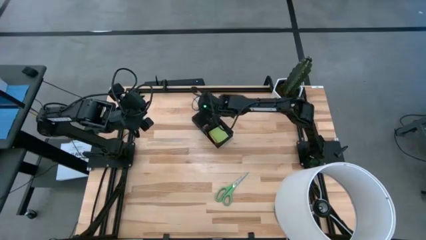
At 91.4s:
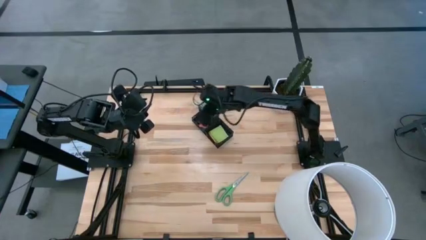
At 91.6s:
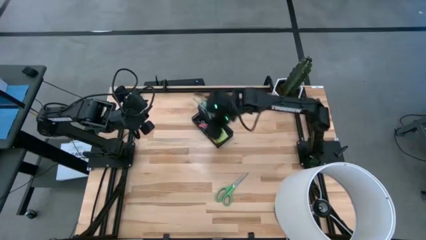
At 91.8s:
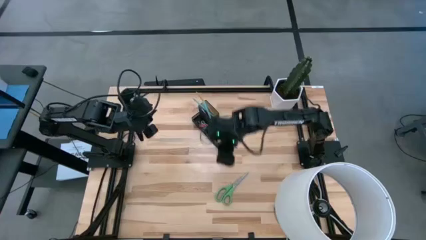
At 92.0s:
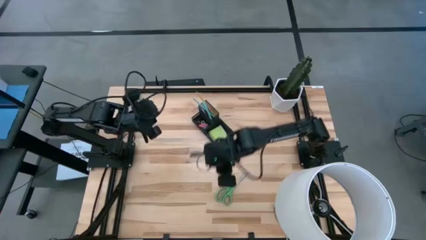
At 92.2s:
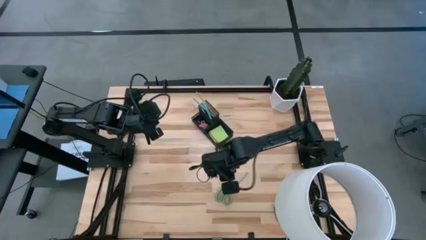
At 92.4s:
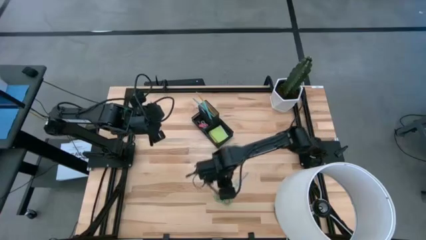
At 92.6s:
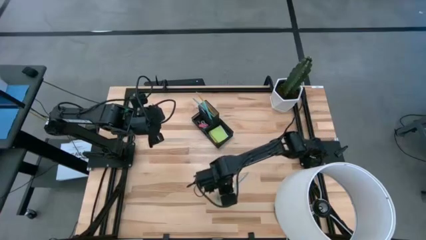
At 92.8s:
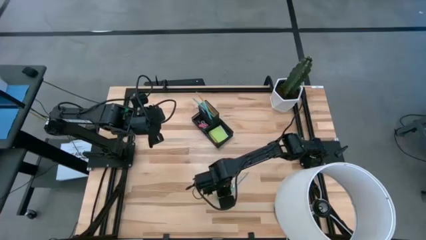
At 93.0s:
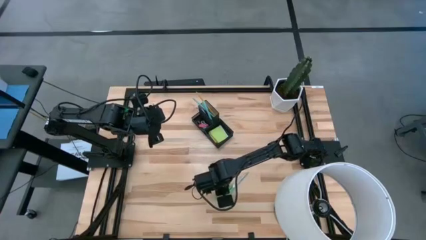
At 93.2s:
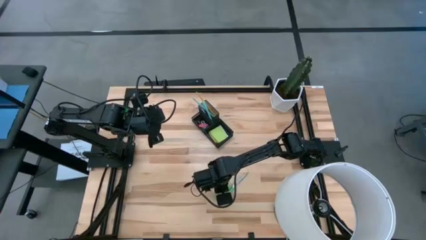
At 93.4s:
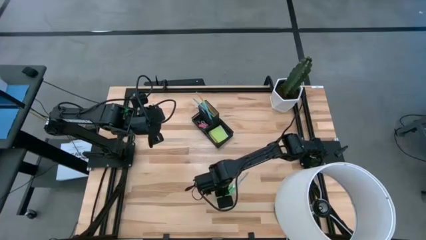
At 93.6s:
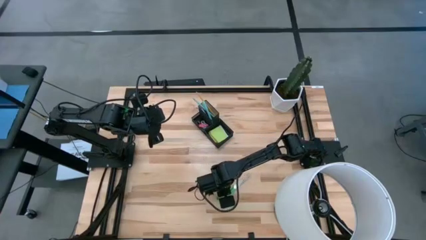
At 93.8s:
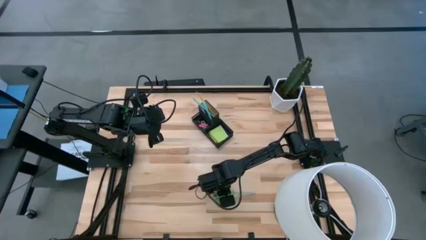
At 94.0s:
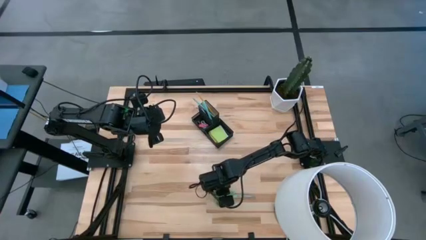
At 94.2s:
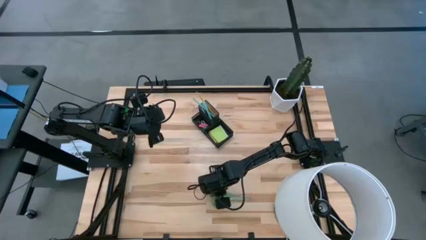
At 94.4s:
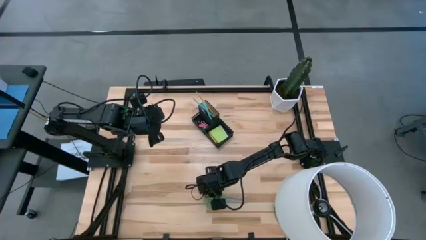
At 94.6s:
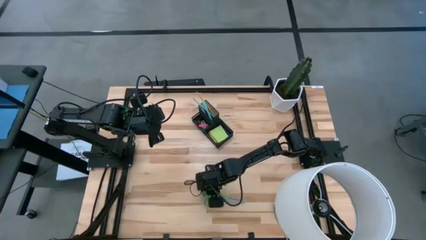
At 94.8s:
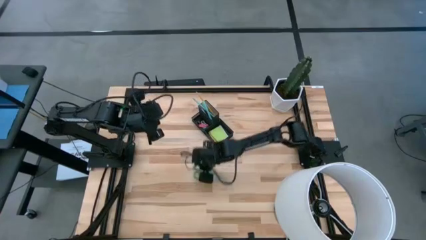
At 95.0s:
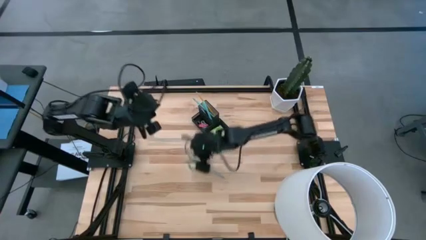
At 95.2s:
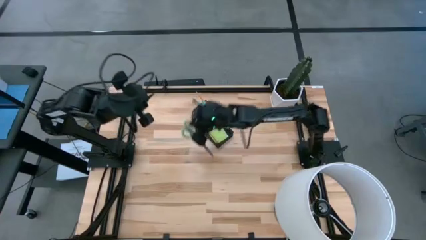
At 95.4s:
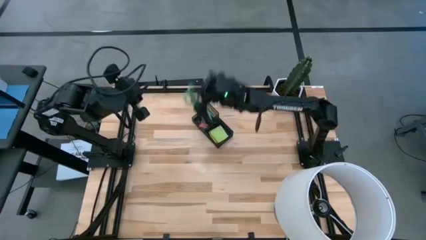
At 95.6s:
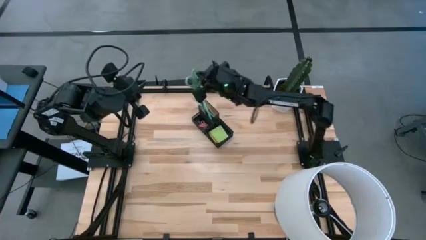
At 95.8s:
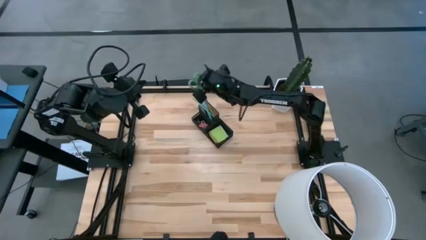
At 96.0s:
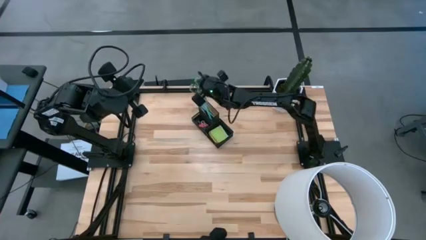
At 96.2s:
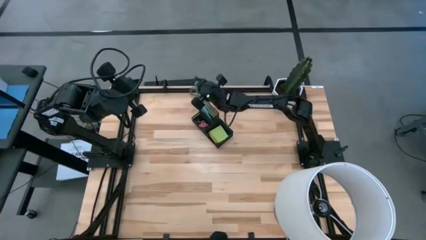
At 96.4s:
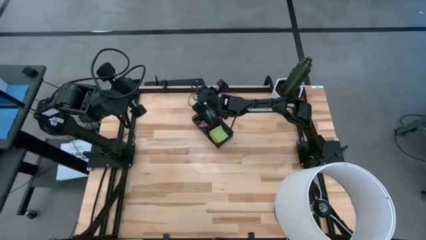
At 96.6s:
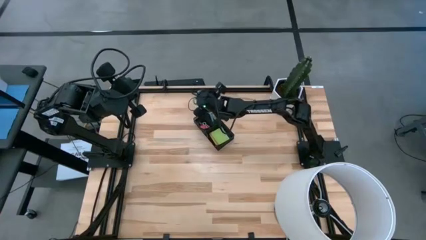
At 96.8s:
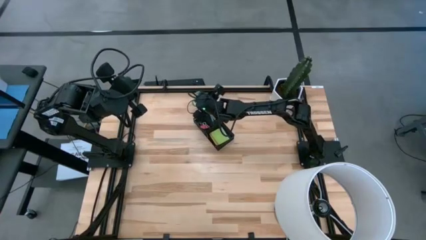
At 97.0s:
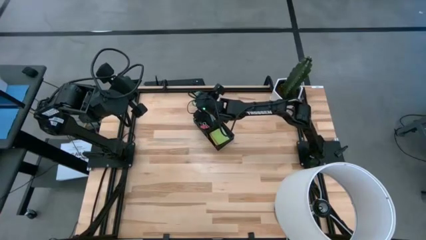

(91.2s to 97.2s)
Task: Pick and place office supplies into organizer
Put the green scissors into the black desk organizer

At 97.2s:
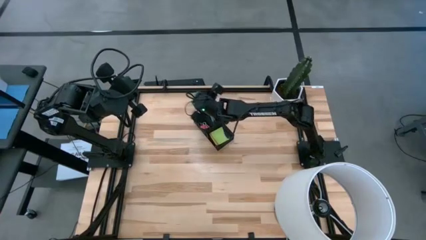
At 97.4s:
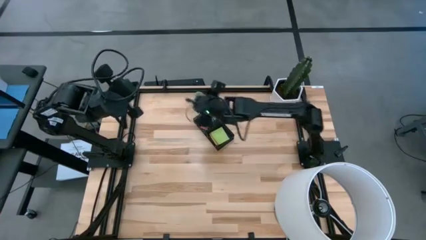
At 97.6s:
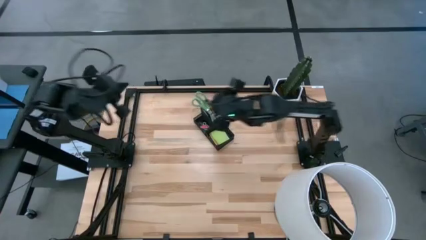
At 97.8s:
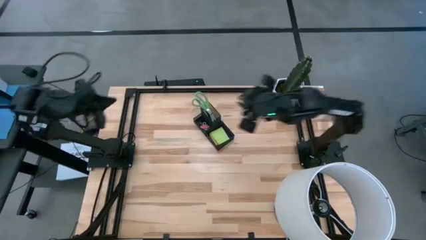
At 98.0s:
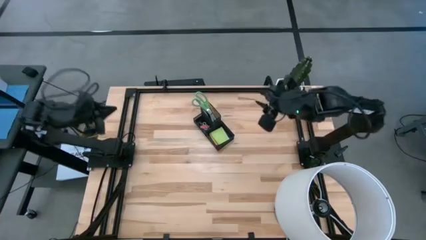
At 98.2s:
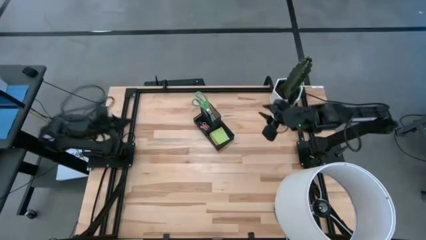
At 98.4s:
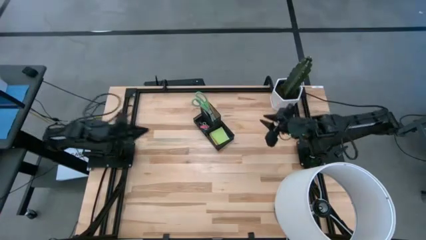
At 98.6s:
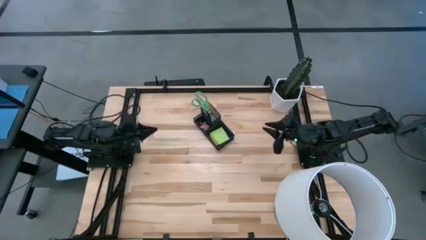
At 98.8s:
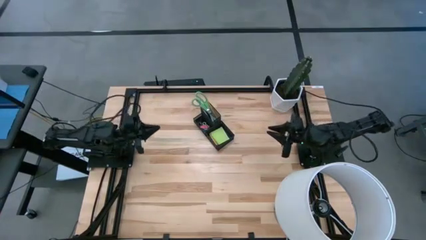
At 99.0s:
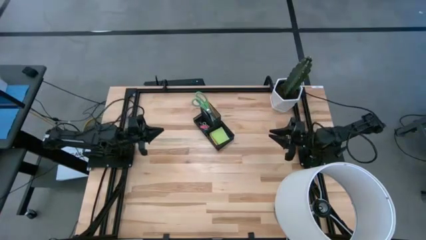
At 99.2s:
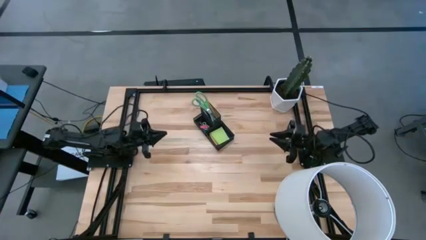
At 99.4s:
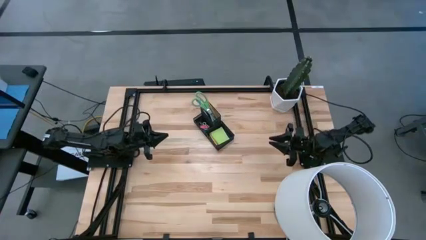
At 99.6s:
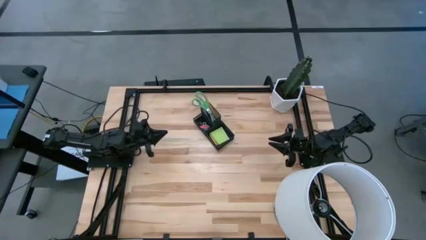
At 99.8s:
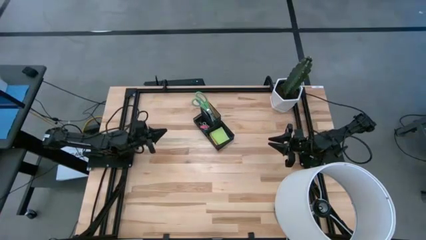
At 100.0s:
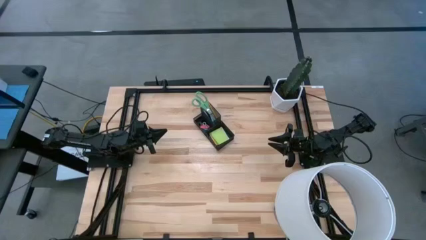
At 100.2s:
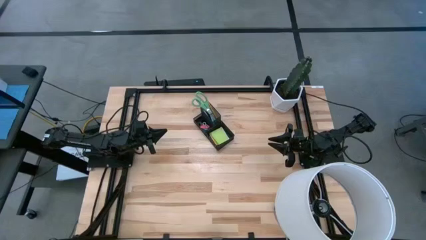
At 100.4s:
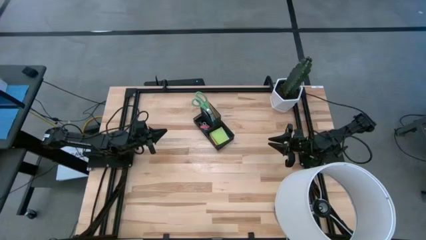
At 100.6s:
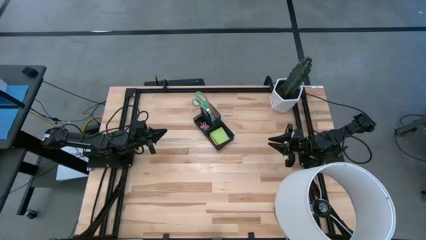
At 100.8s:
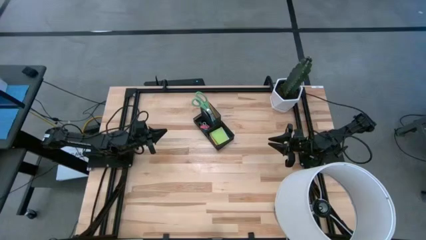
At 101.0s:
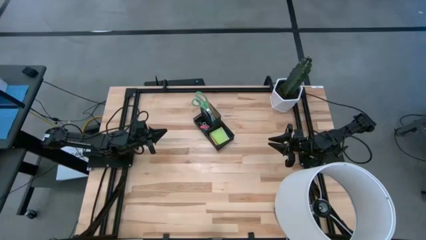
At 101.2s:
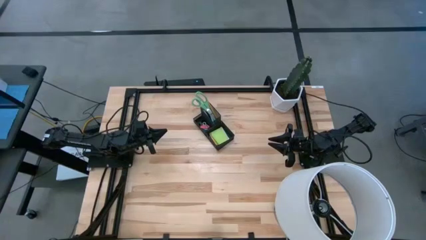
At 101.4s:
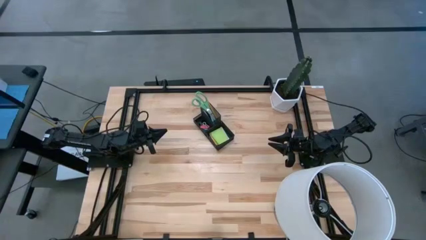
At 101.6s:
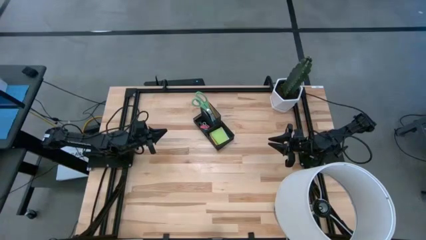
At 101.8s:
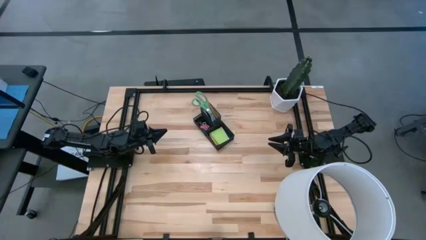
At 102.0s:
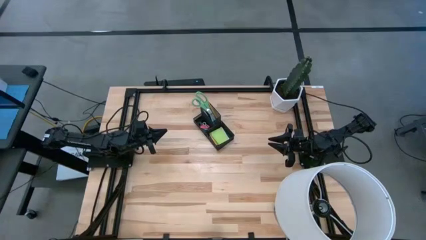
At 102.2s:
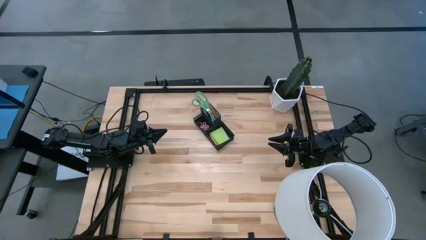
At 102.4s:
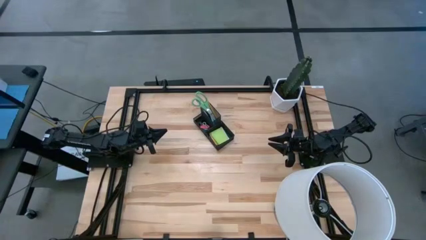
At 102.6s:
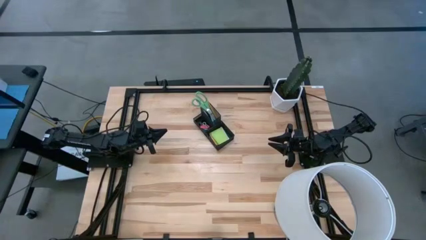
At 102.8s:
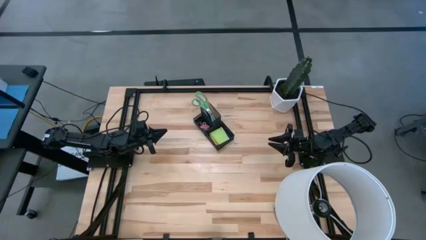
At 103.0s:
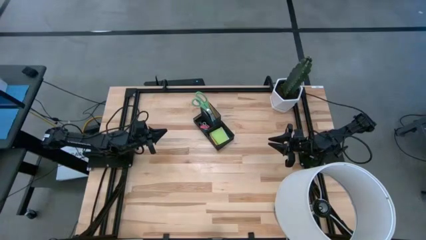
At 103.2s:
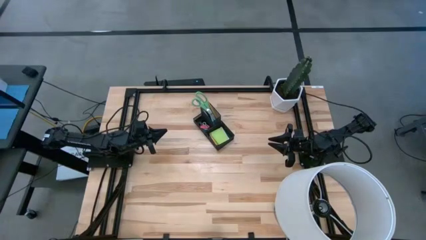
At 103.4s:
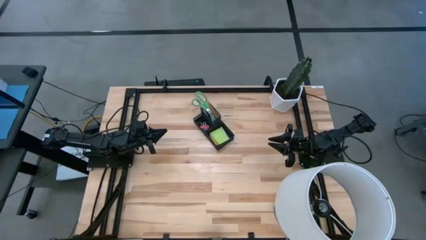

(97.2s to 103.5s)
Return to Home Position
